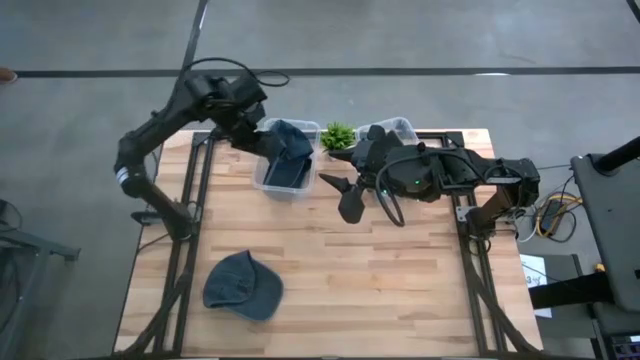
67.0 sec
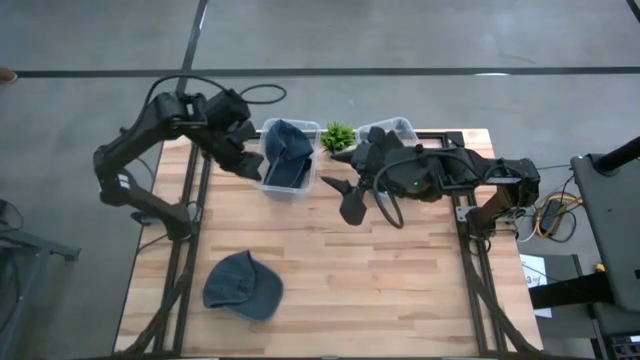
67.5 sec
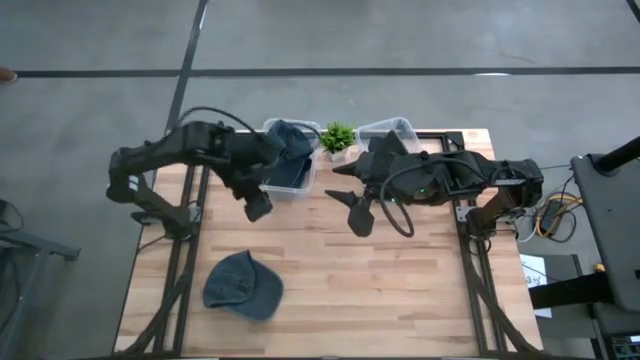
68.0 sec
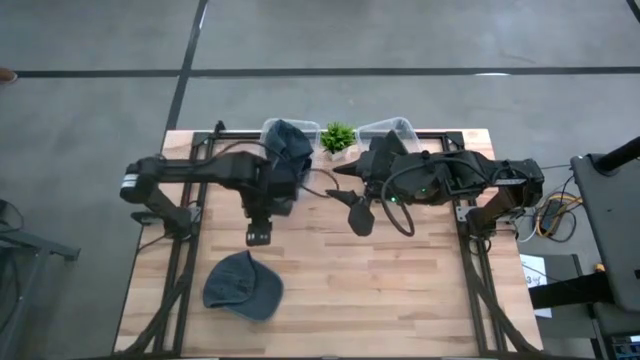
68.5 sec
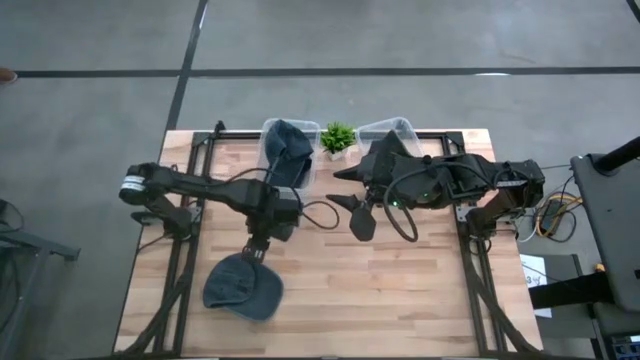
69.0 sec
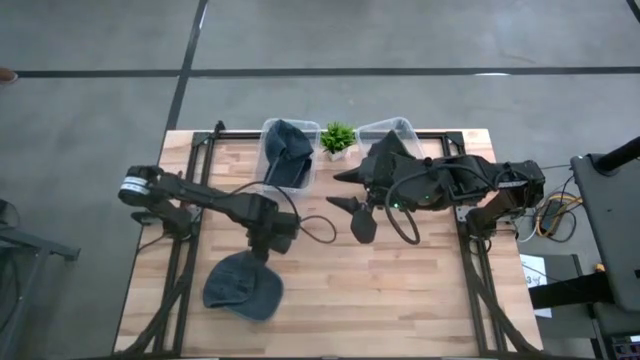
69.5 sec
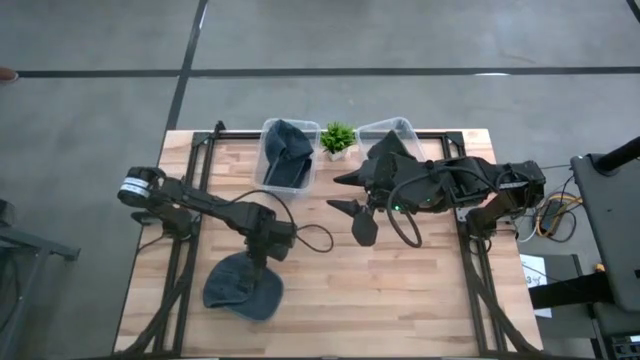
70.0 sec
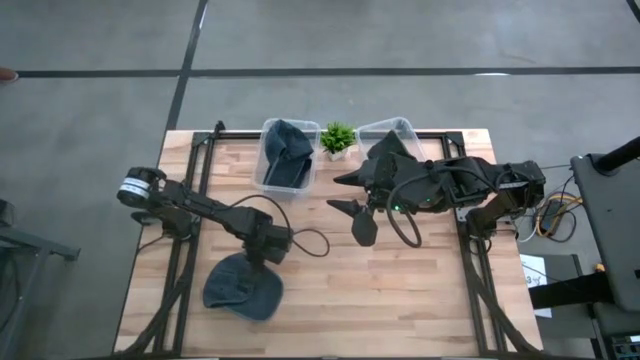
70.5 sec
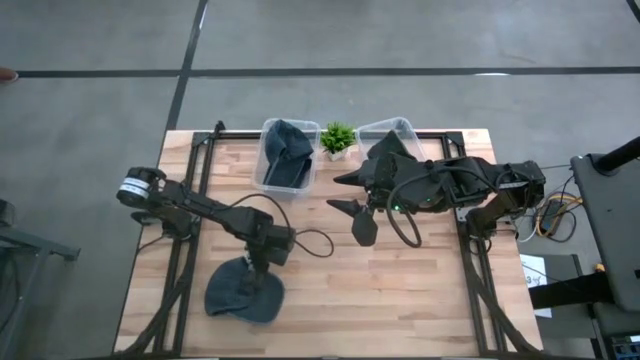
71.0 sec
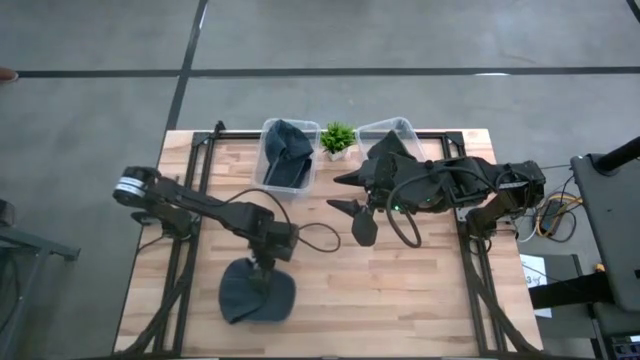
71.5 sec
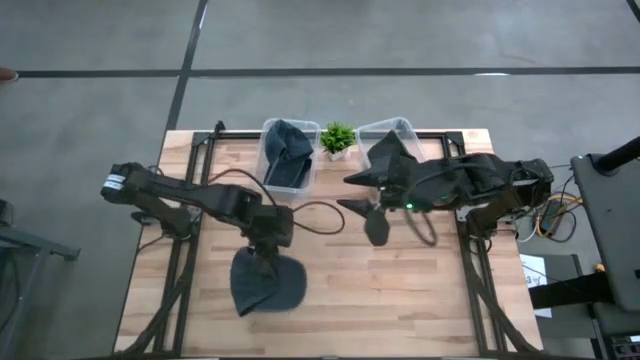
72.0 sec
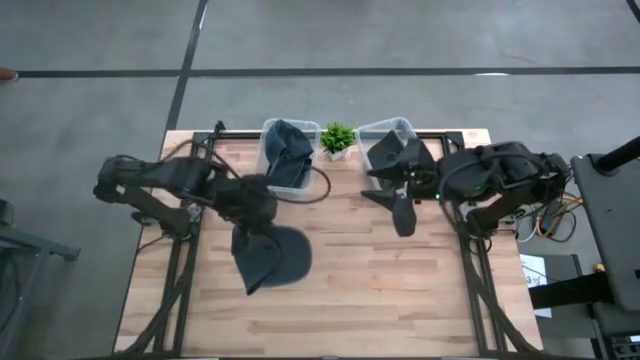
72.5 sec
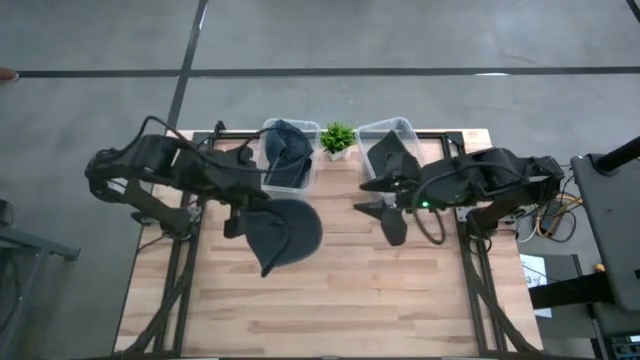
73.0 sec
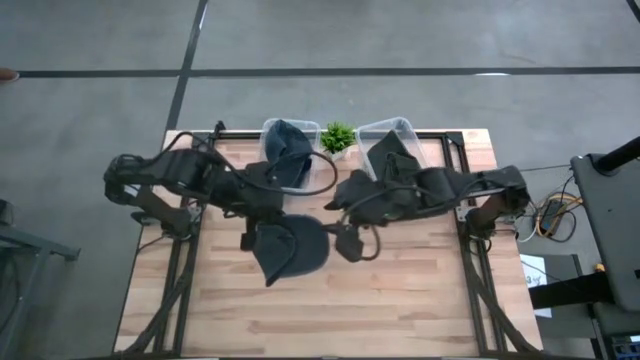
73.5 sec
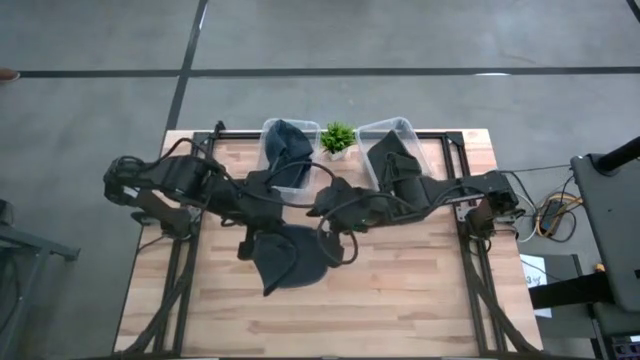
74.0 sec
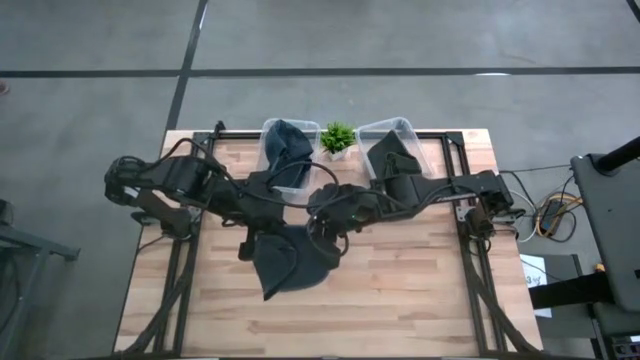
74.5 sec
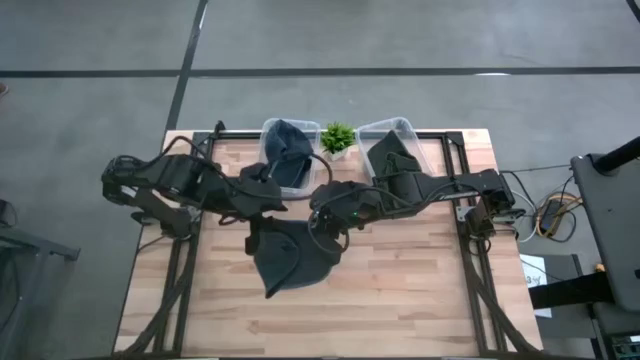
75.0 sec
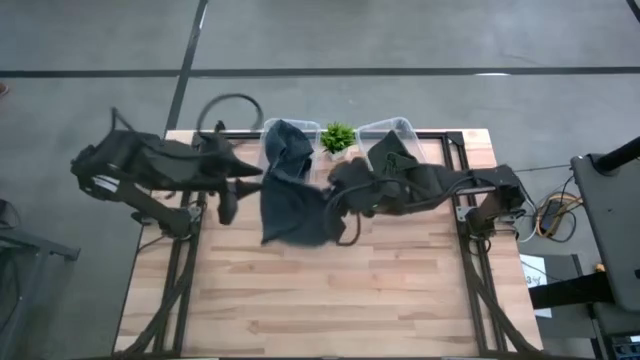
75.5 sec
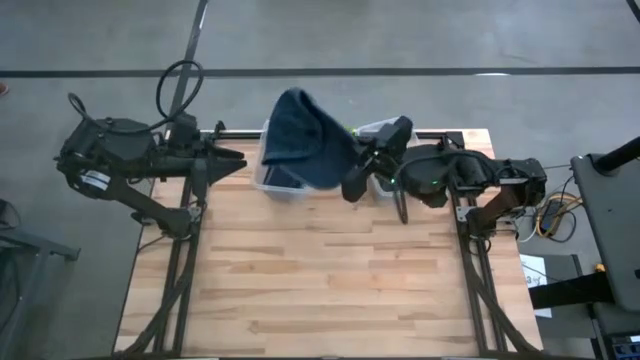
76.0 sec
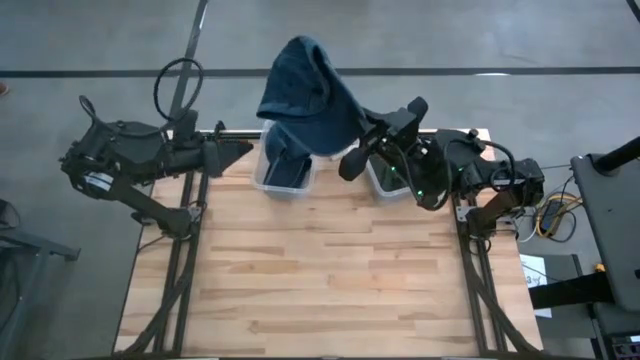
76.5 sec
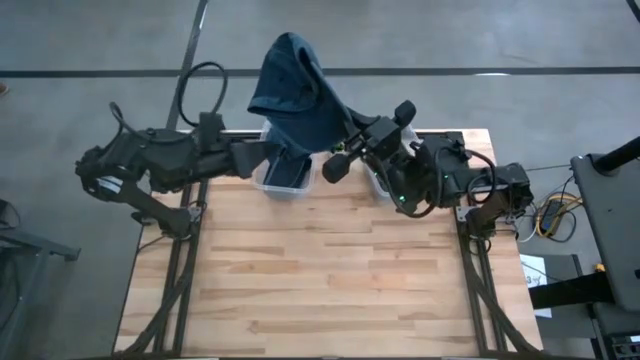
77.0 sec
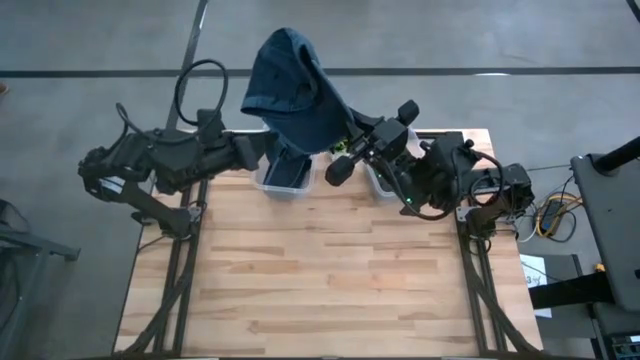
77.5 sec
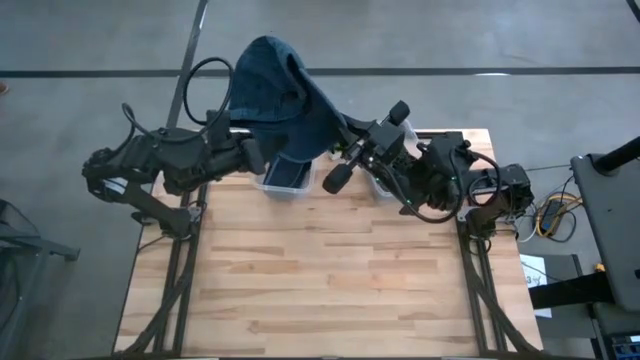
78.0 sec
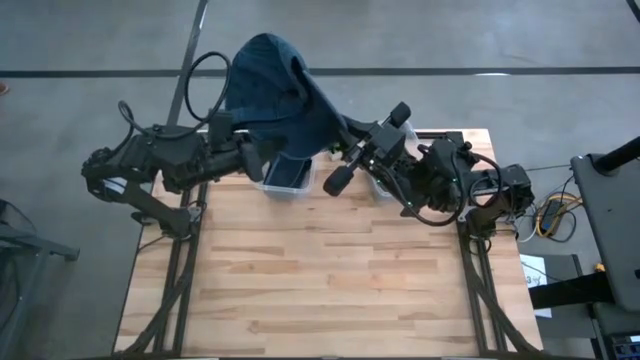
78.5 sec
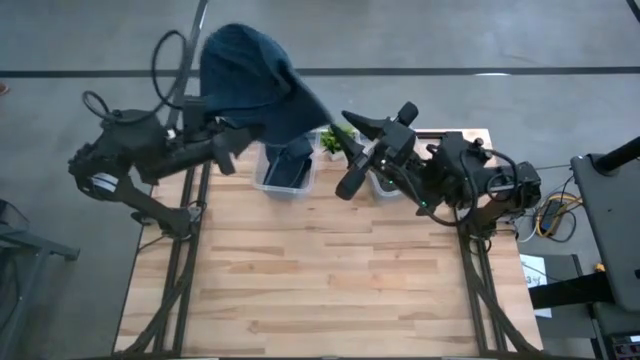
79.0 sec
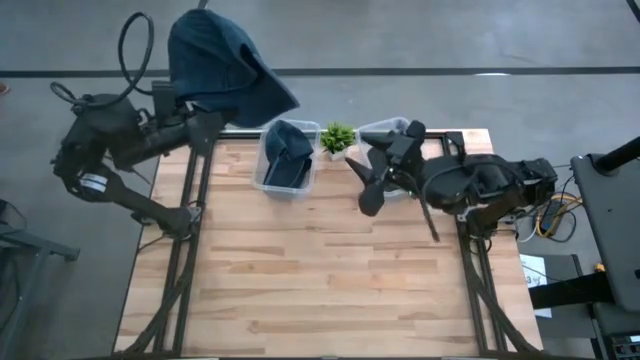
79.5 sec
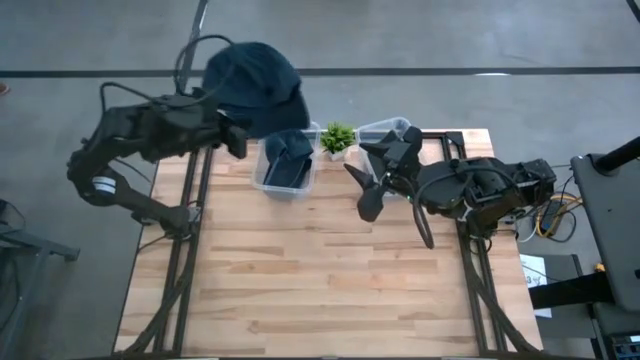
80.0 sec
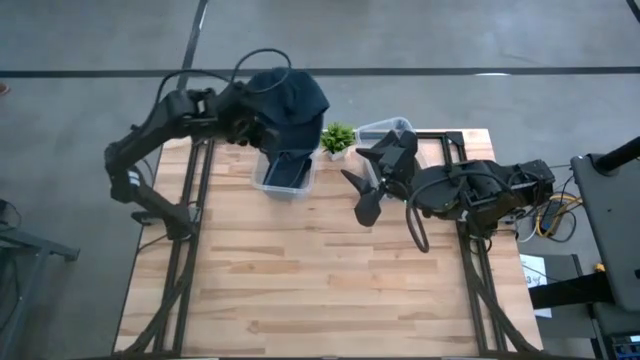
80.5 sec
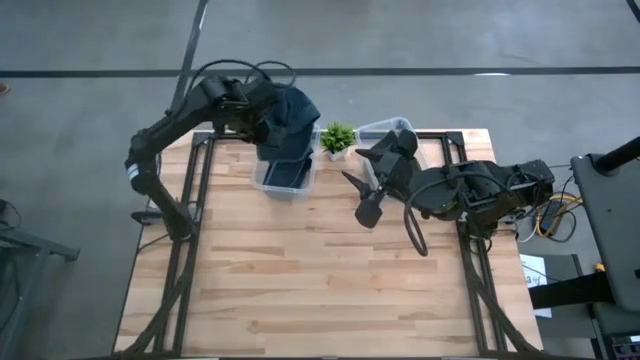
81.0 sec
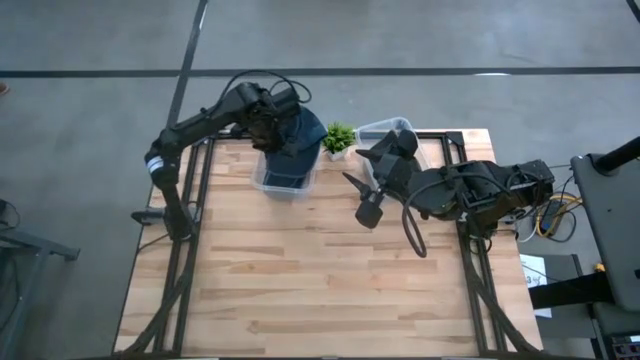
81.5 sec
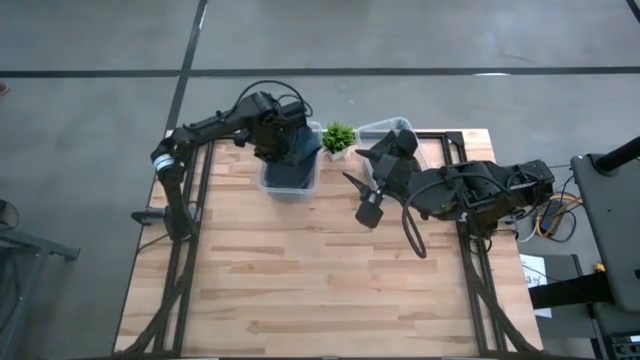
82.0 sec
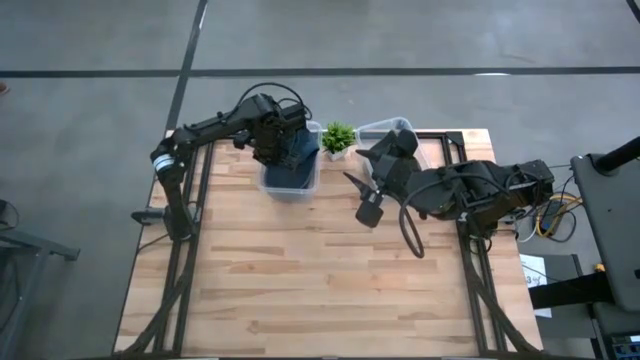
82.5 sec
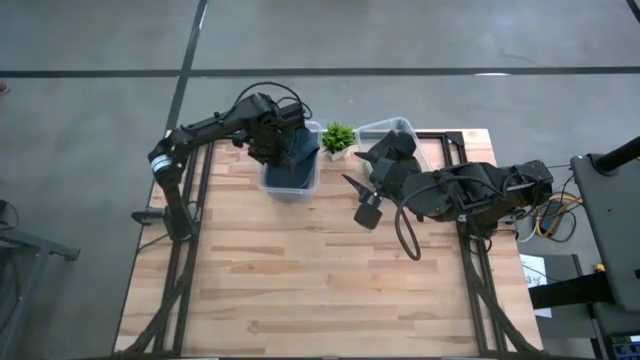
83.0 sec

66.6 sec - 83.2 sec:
Task: Pick & Place hat
Put the blue cap into the left transparent bin

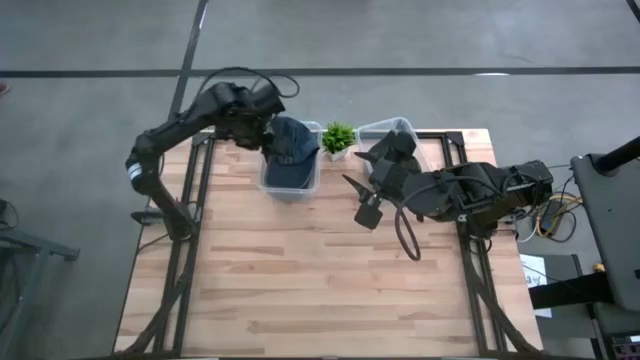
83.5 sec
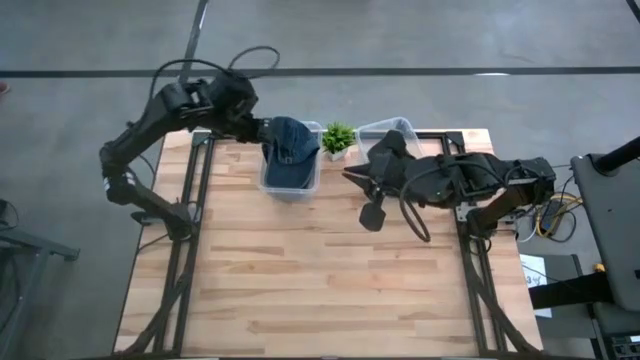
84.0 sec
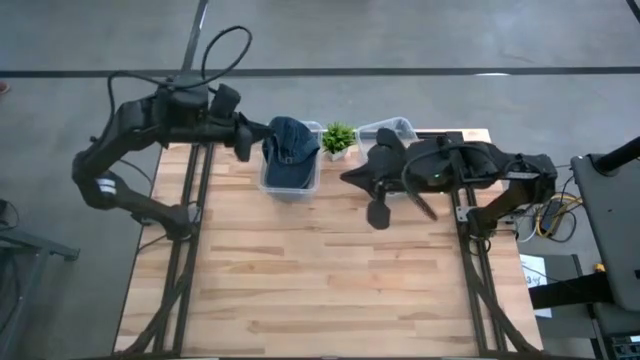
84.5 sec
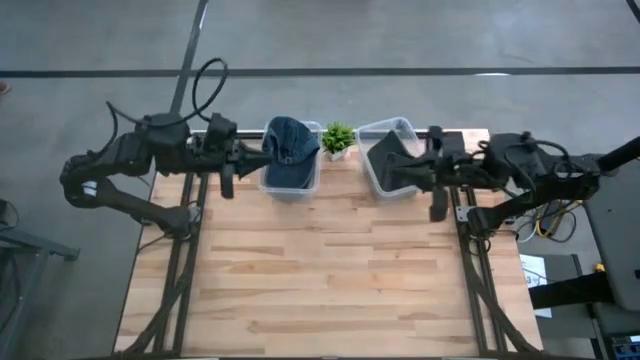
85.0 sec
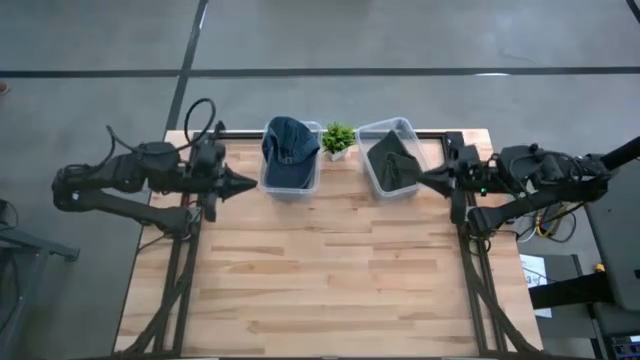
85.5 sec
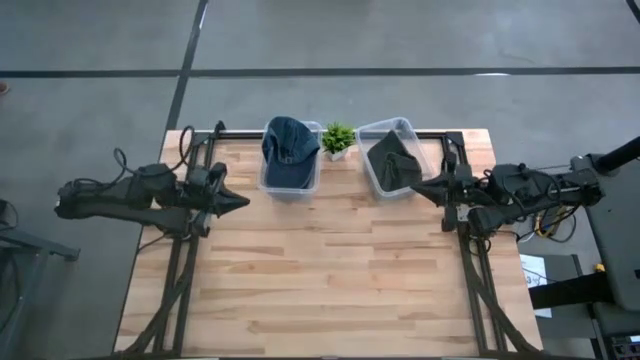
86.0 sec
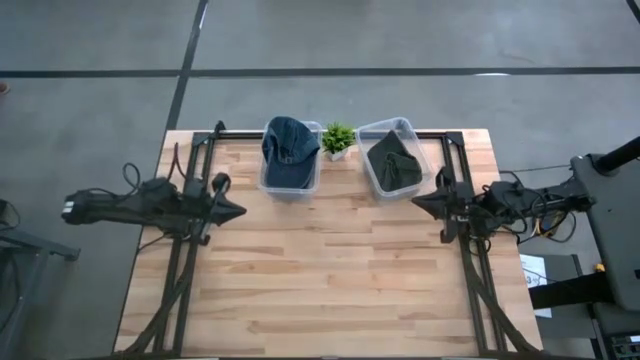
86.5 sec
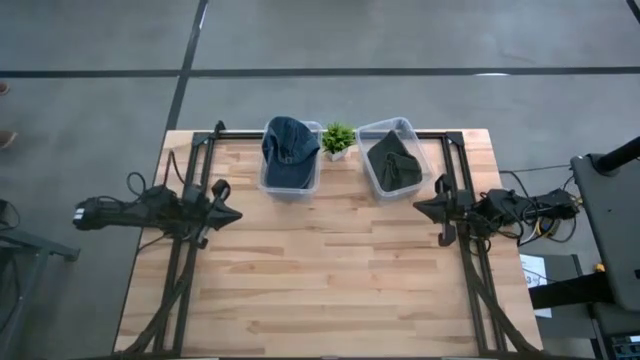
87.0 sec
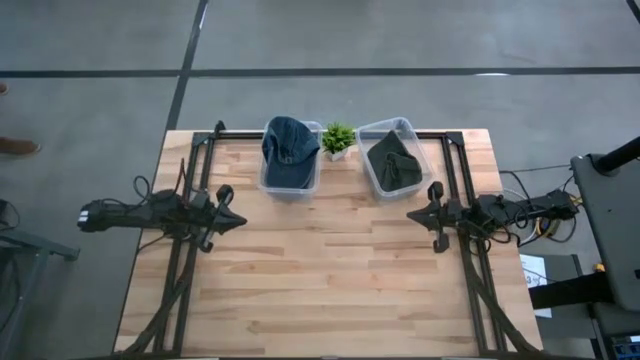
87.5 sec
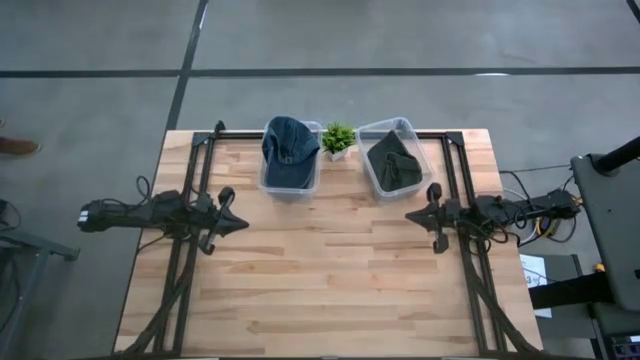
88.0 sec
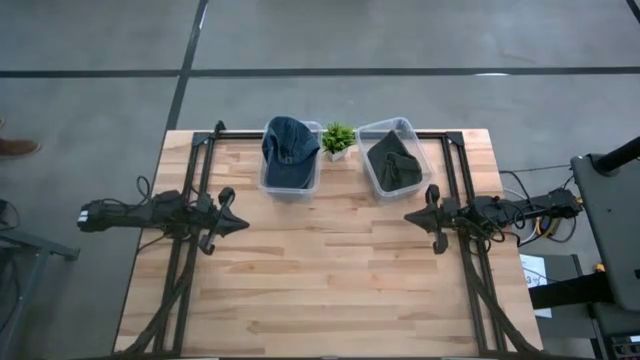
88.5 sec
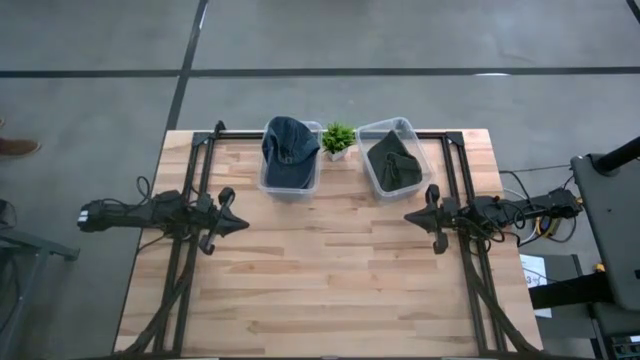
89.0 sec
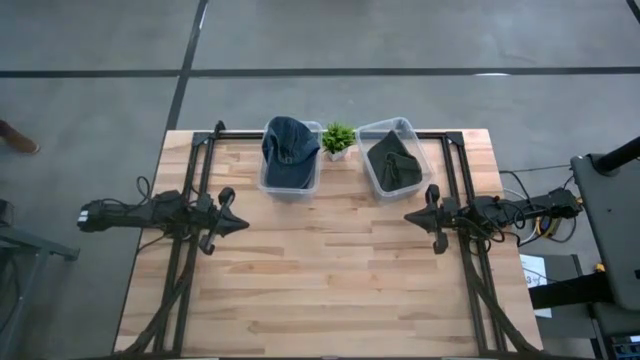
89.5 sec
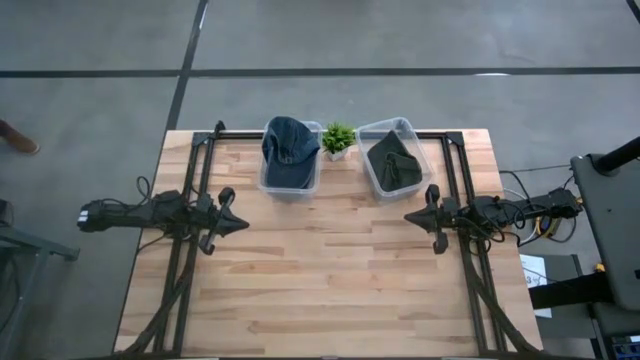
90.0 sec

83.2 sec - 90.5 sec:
Return to Home Position
